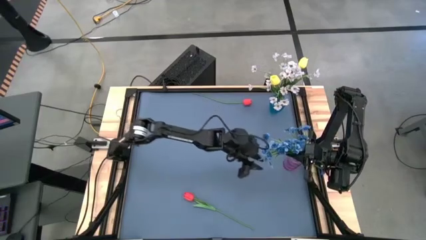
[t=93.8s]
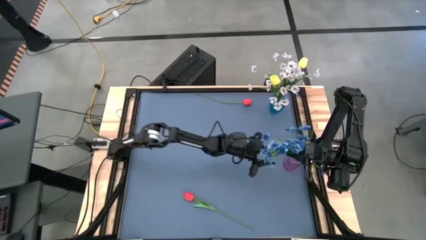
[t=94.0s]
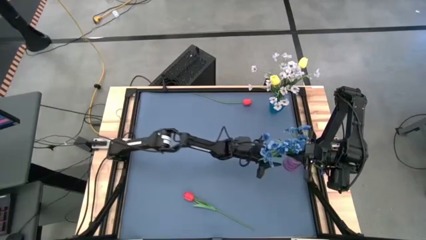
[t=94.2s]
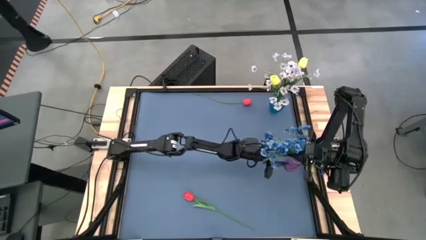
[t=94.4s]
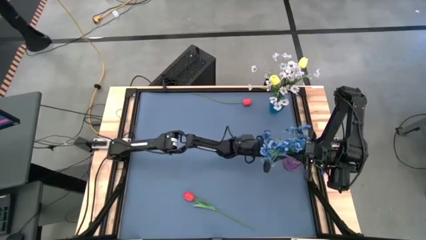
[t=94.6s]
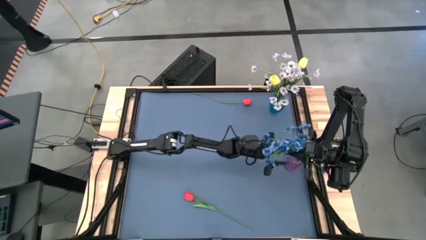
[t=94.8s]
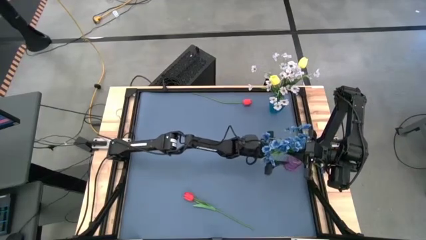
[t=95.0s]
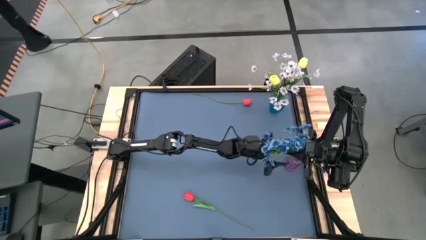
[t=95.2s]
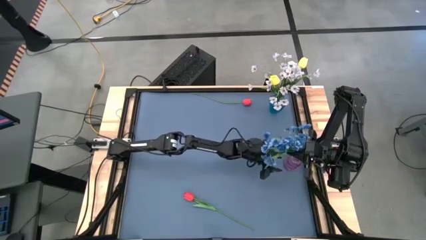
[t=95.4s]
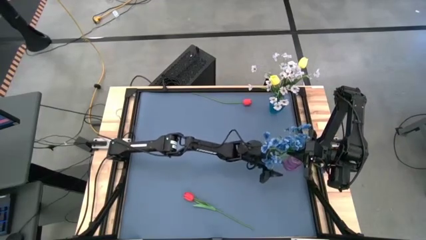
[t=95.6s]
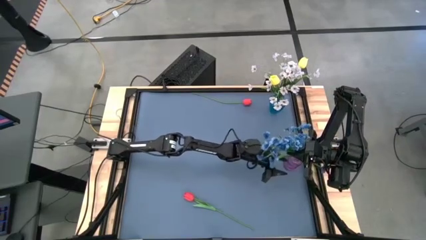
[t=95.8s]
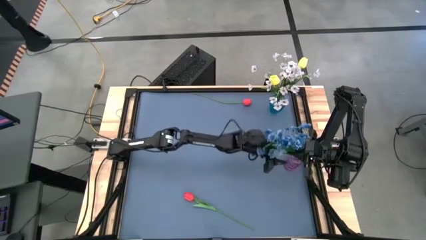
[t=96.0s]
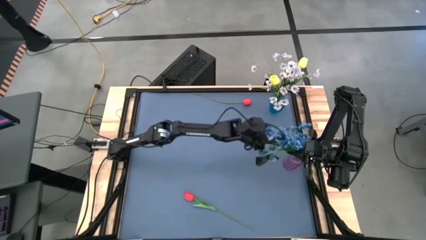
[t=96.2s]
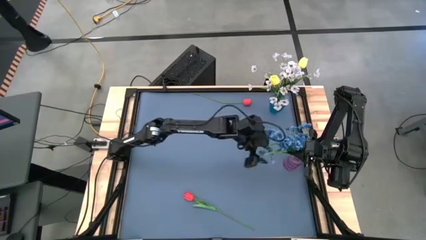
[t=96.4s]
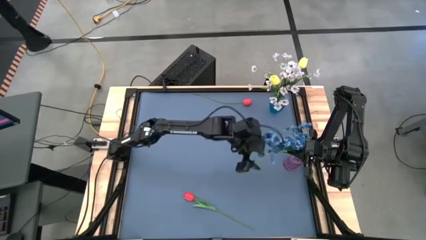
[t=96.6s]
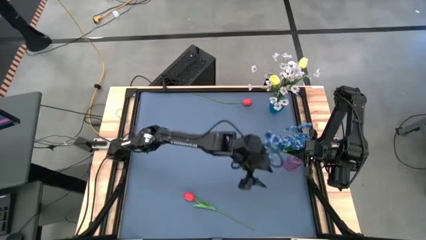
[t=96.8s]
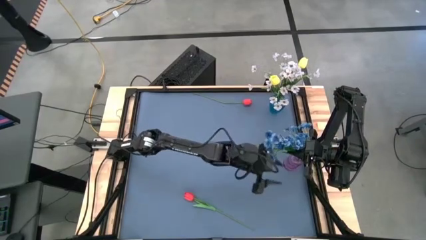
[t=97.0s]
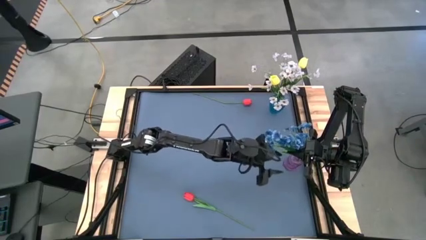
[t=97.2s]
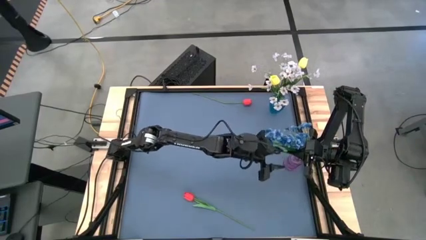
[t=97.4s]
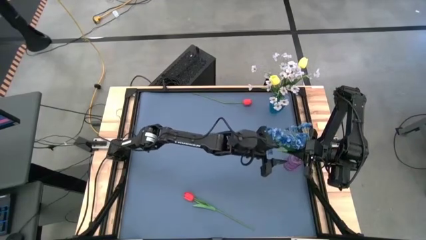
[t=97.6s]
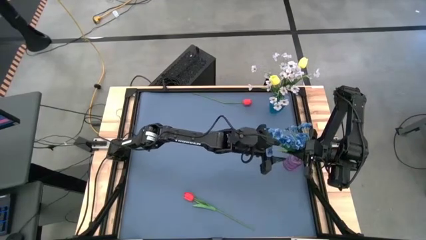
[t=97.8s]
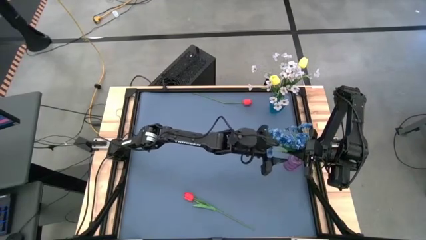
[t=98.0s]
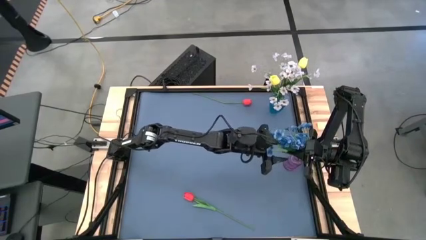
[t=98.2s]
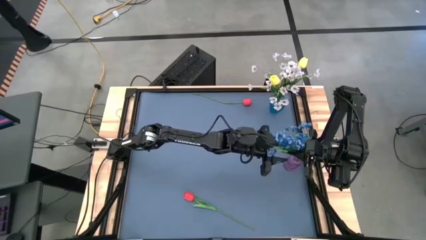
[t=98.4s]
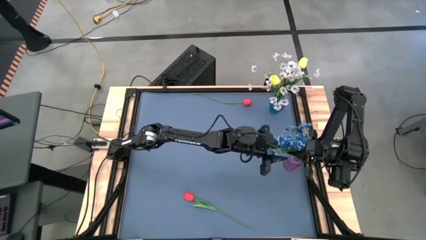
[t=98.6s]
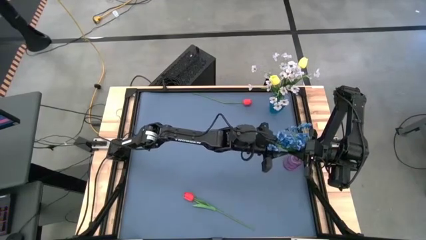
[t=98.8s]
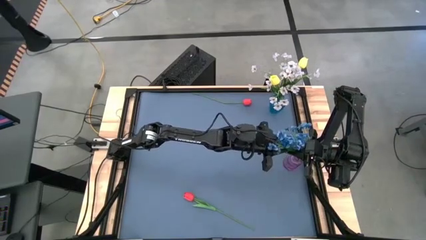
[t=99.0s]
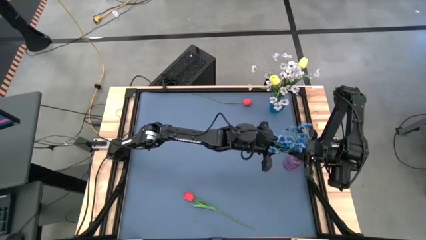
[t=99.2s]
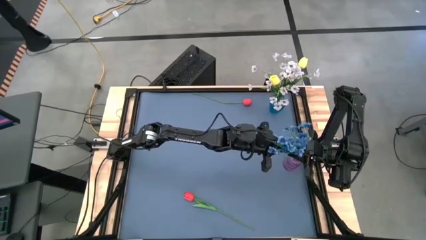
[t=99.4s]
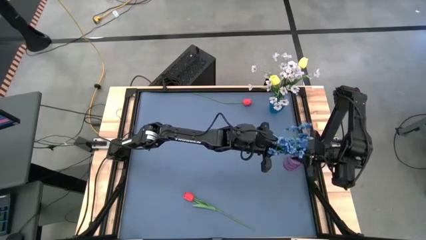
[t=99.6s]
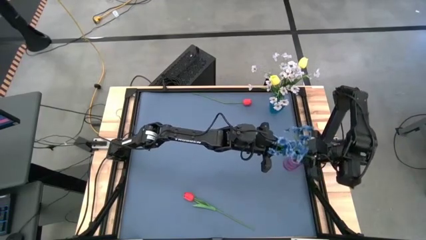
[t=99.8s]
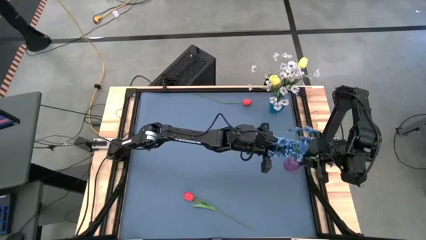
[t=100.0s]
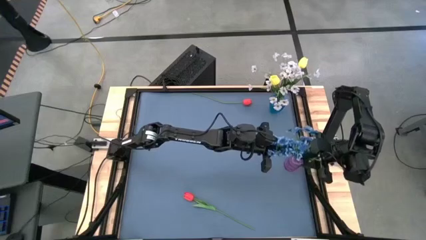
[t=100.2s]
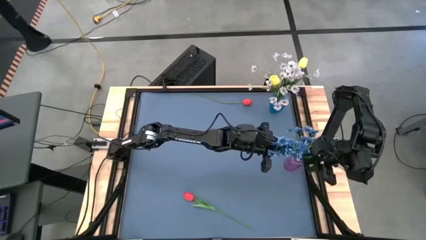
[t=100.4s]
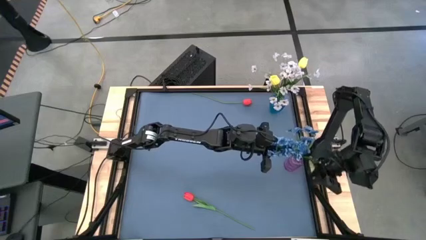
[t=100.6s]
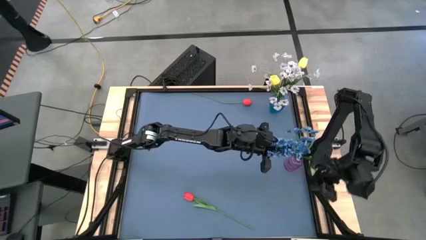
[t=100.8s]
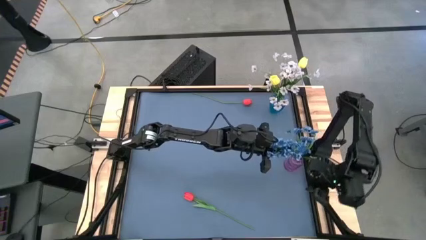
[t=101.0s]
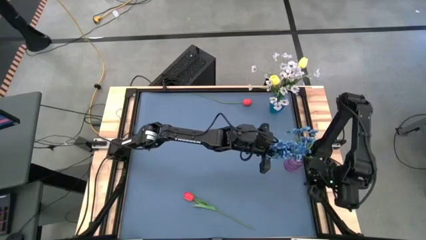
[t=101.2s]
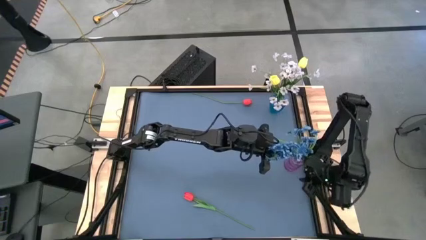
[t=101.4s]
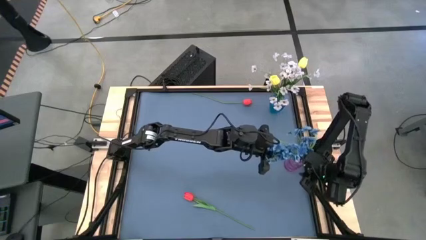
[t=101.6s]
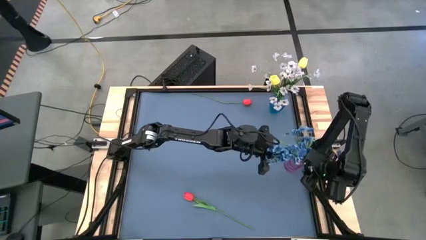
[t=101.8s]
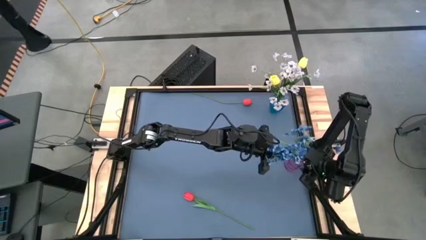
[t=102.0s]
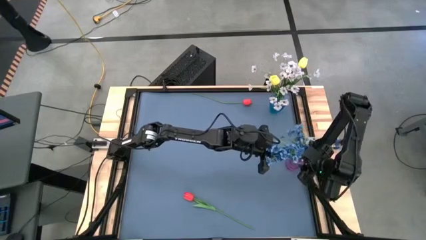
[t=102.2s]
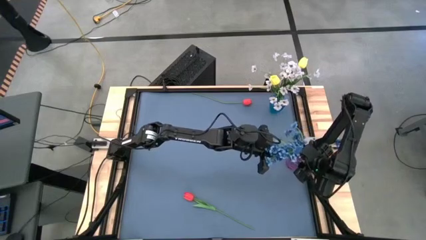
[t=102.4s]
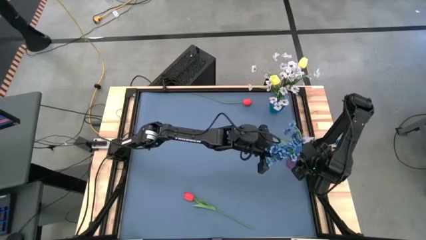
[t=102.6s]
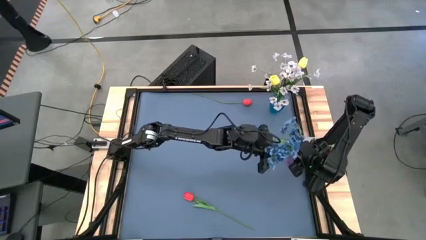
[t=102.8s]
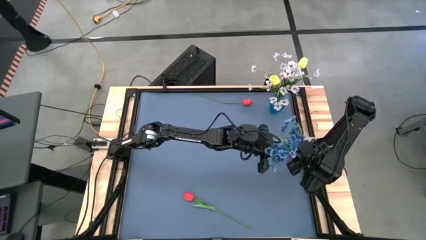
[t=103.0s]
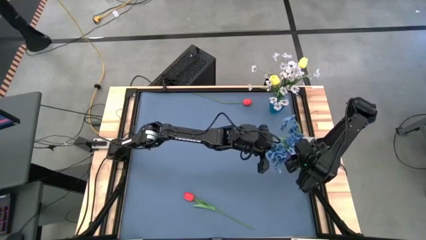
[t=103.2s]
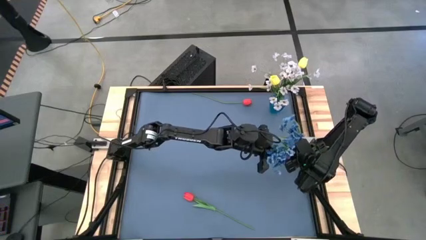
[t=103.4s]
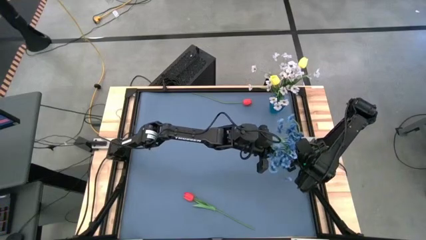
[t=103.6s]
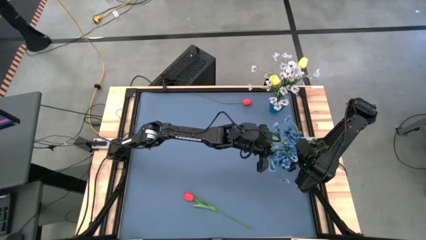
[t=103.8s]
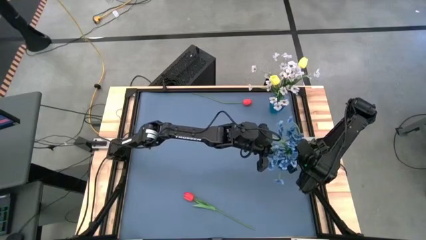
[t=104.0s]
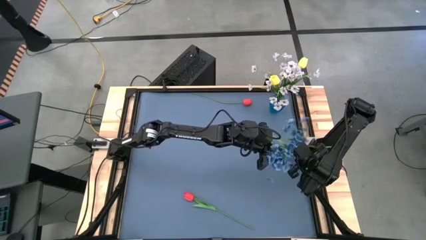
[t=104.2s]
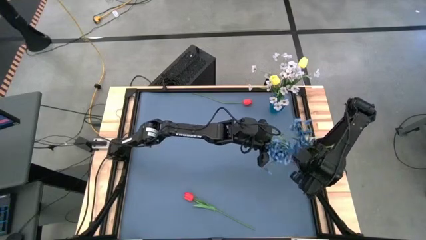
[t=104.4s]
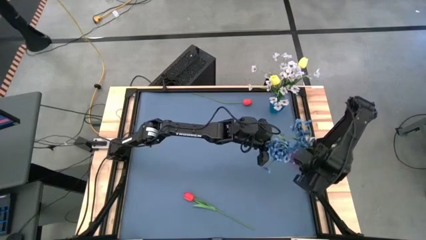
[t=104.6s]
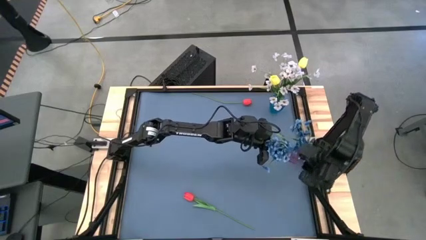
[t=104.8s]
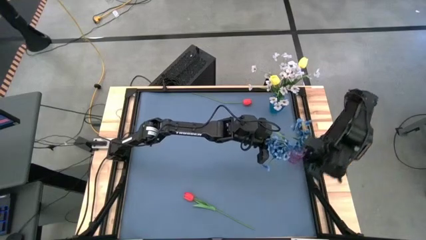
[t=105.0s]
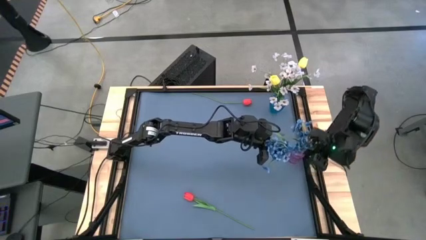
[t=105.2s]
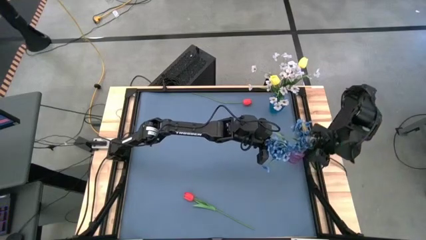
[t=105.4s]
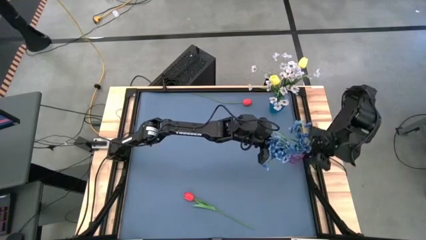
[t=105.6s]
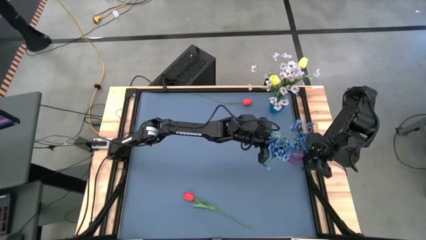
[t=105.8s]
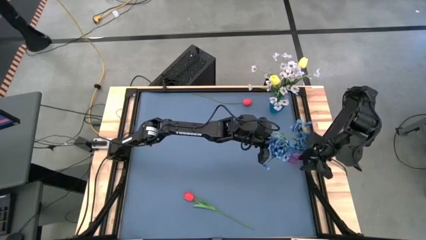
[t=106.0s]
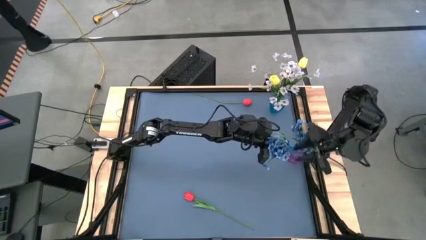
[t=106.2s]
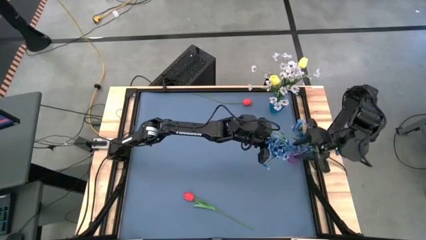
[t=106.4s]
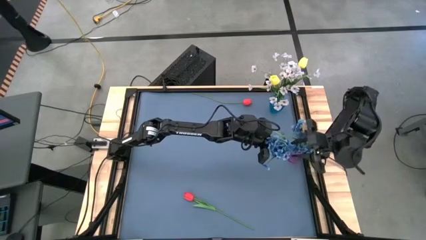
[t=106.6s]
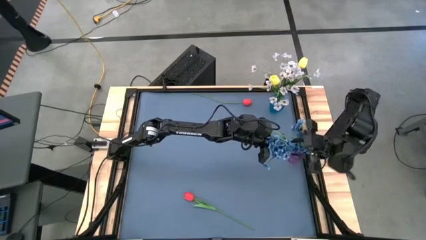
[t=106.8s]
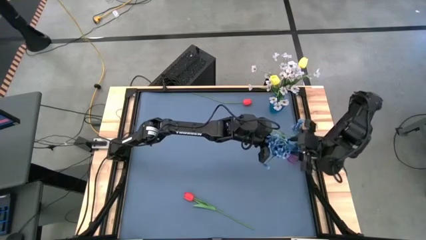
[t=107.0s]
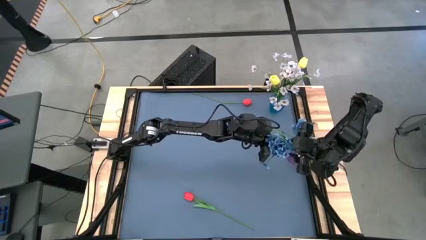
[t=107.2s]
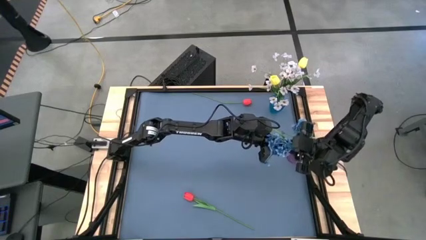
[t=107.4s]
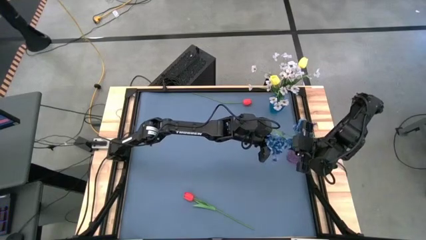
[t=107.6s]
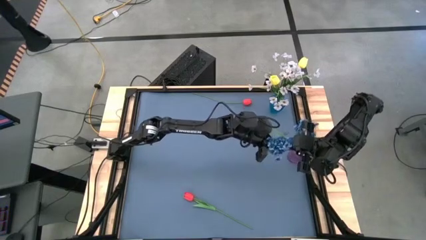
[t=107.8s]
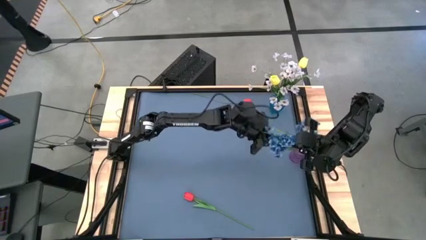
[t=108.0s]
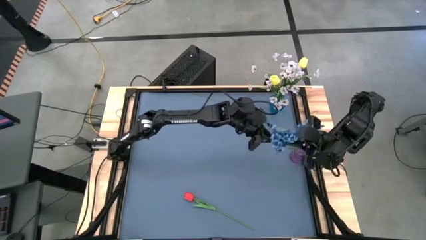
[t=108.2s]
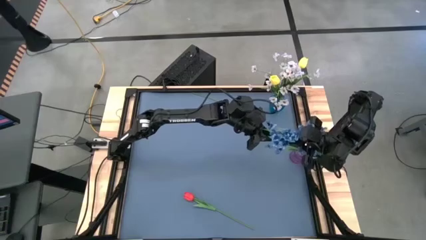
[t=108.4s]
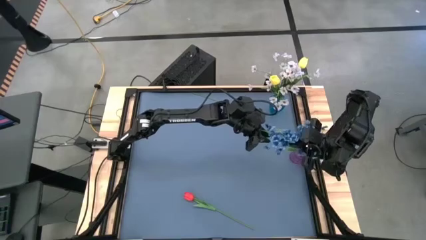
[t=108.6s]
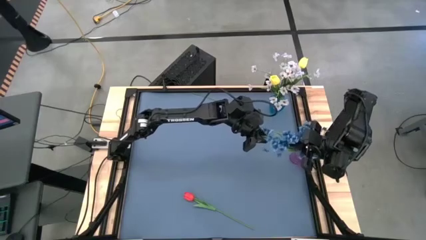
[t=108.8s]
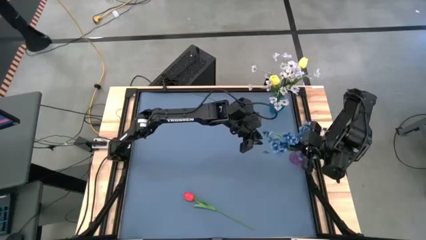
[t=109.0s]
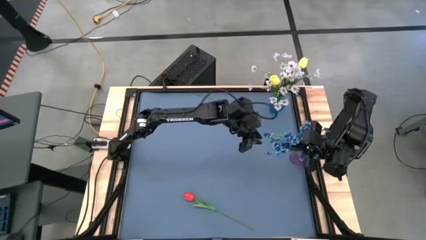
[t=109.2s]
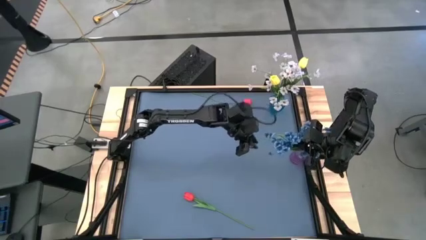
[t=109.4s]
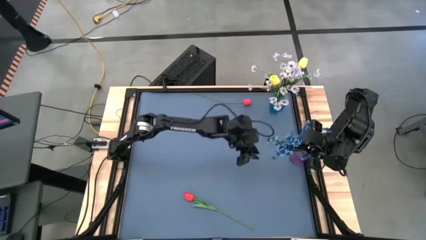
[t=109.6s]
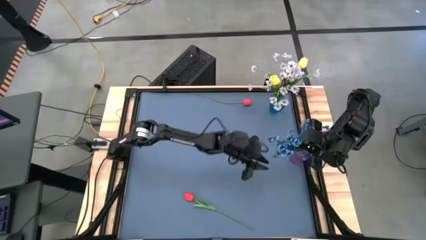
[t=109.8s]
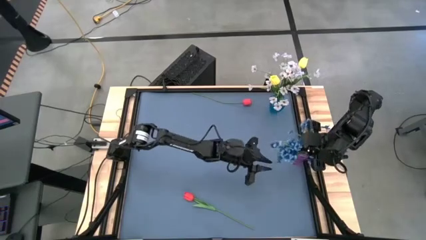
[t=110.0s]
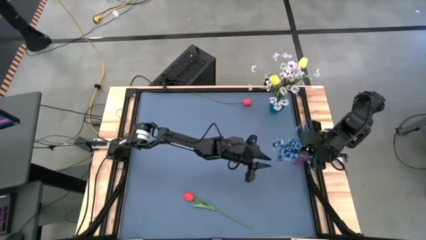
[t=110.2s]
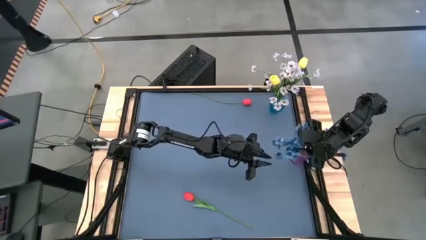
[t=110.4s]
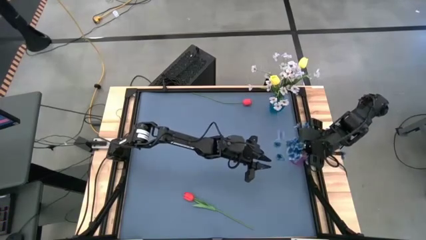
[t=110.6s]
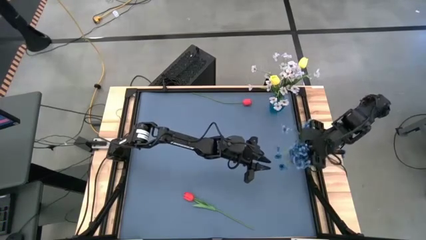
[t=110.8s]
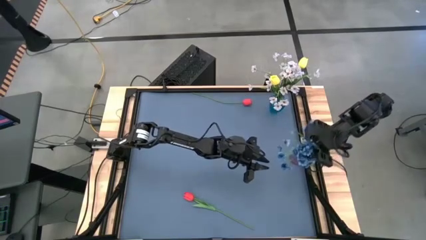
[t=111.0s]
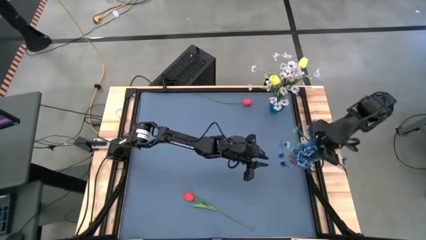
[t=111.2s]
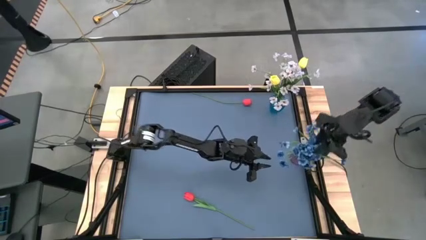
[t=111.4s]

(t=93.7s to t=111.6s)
Task: Sort flowers into vase by color
Put the blue flowers into the violet vase
